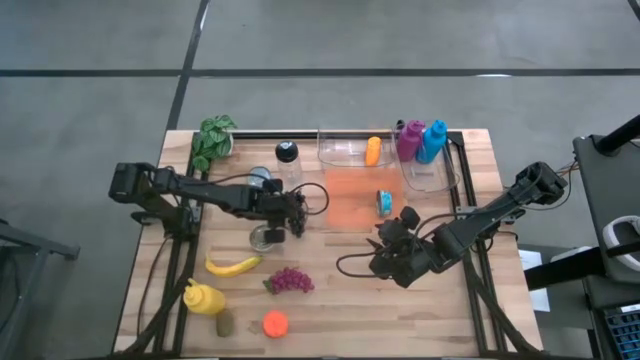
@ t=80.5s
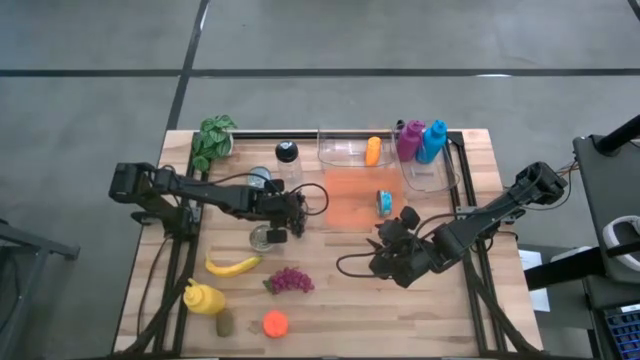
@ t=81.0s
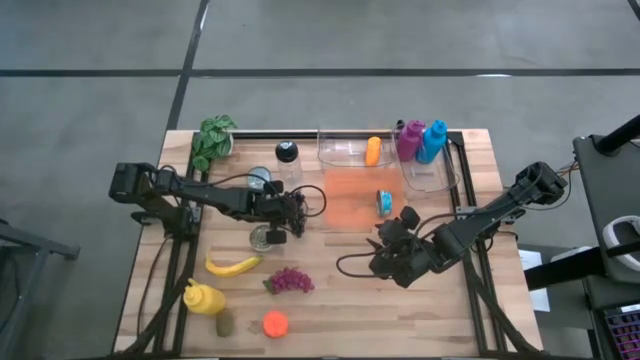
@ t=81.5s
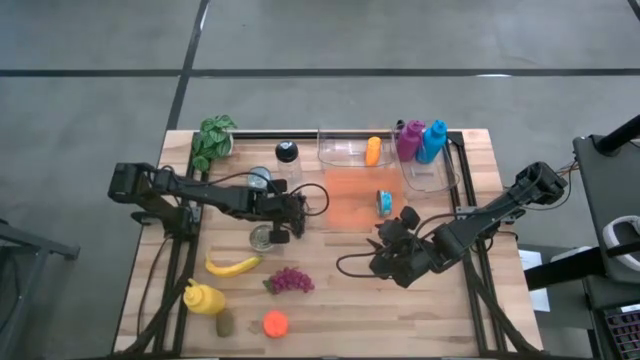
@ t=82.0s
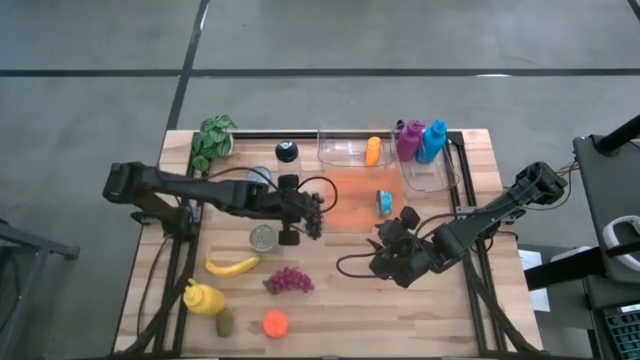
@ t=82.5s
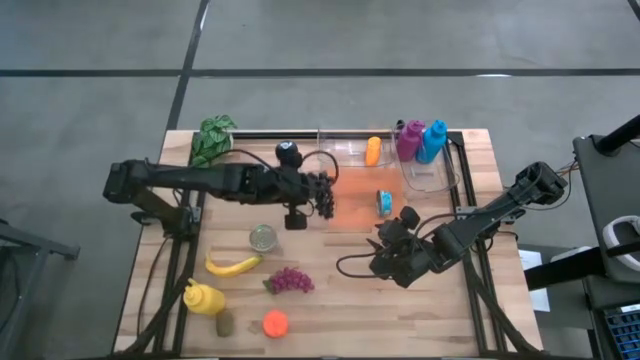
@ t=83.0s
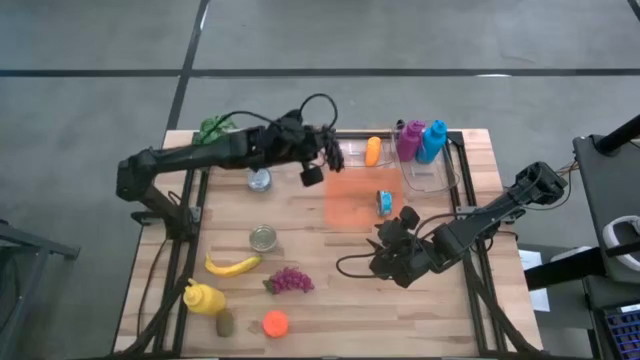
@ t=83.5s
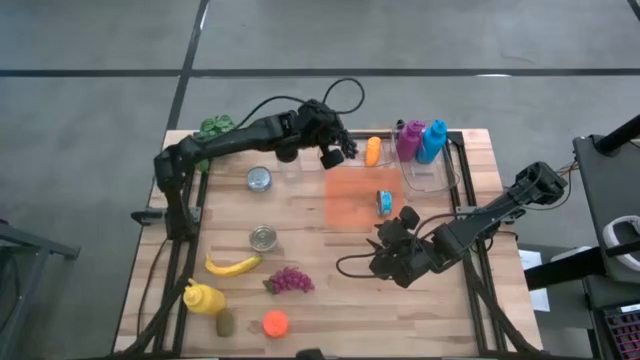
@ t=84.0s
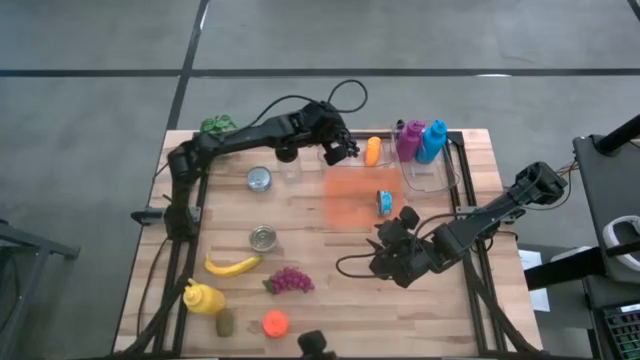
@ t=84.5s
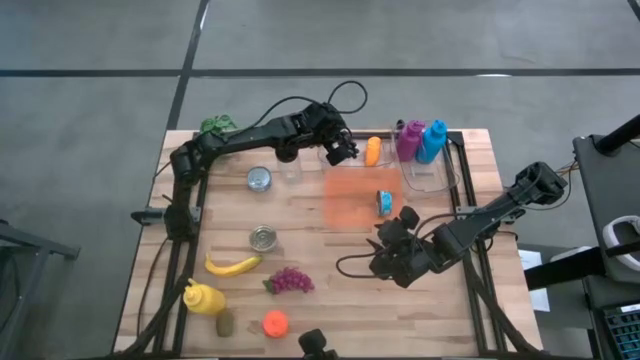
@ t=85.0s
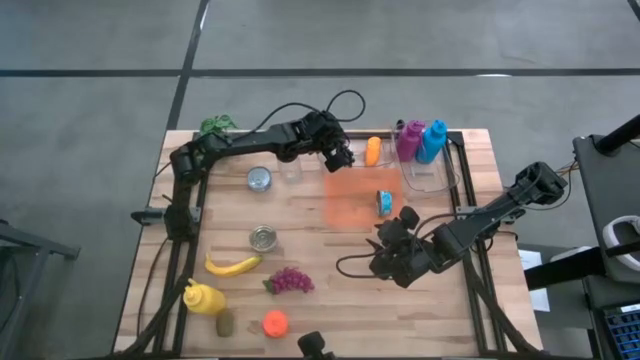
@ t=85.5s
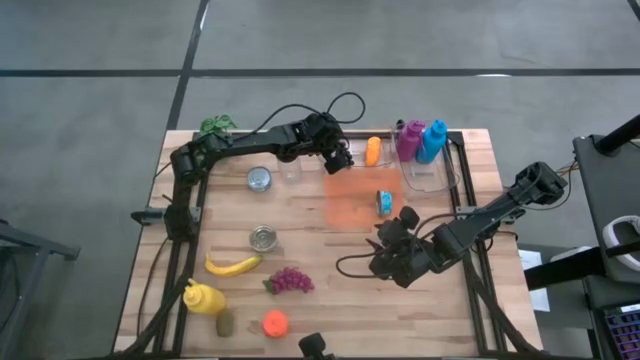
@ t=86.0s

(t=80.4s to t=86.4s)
Task: Pick & Place Food Item
Put the dark violet grapes into the left transparent bin

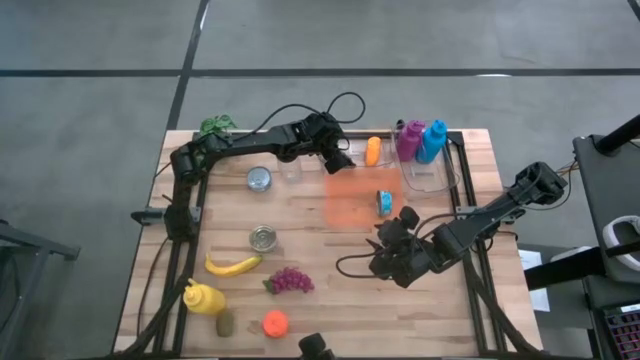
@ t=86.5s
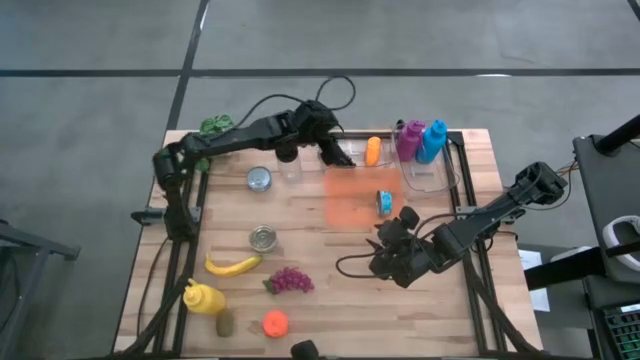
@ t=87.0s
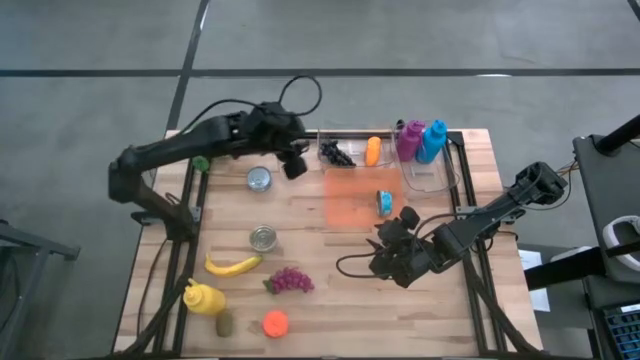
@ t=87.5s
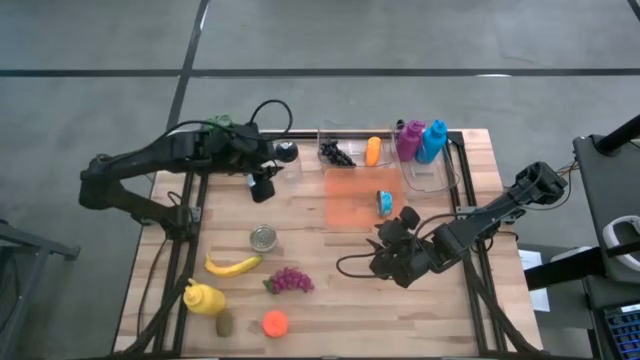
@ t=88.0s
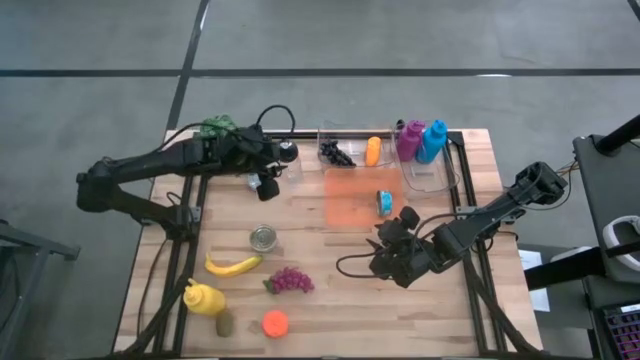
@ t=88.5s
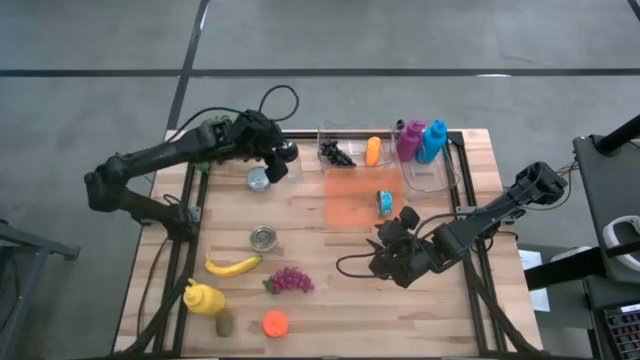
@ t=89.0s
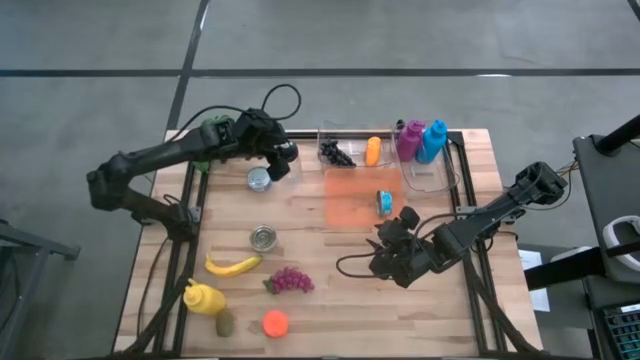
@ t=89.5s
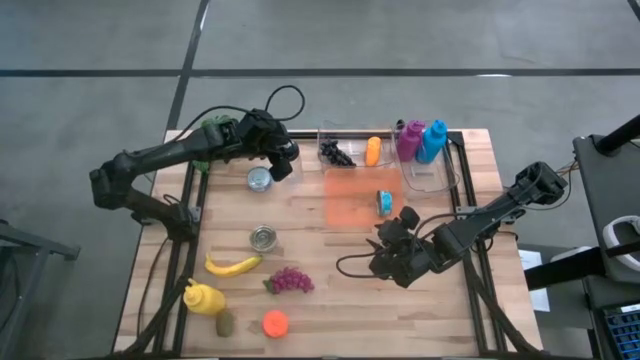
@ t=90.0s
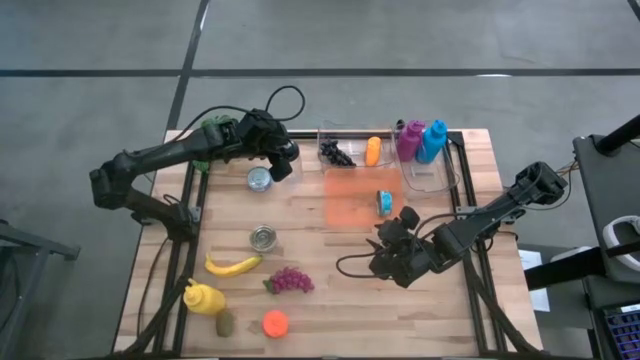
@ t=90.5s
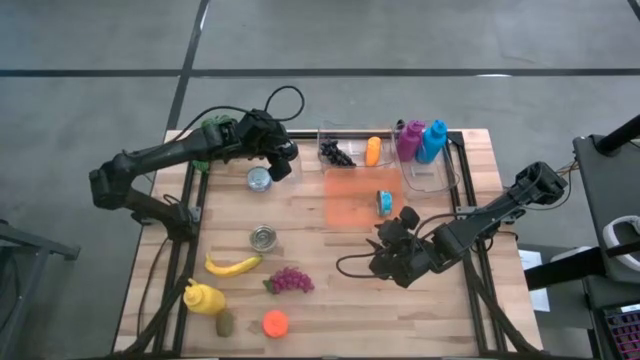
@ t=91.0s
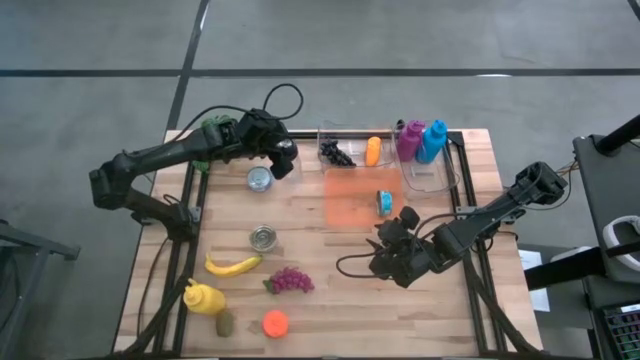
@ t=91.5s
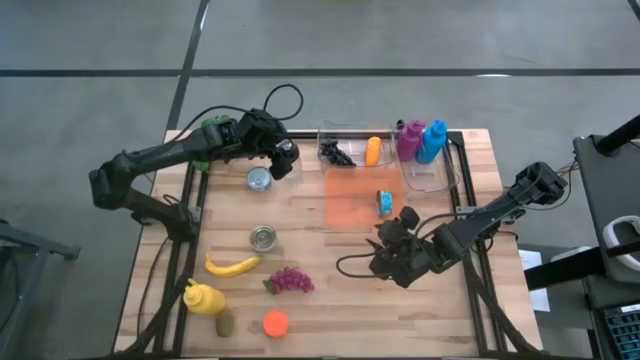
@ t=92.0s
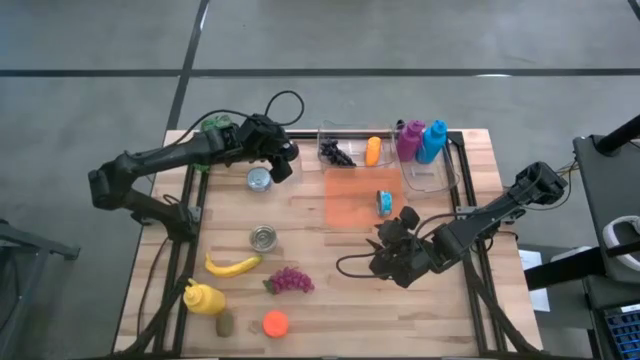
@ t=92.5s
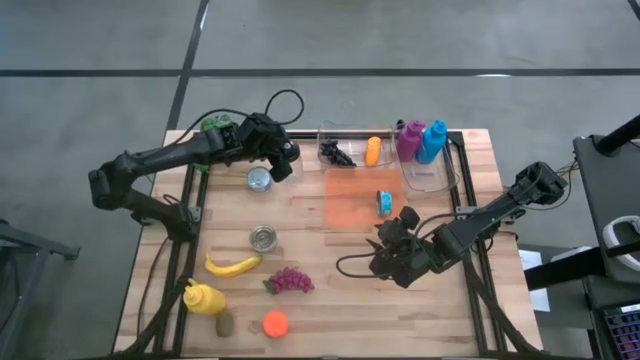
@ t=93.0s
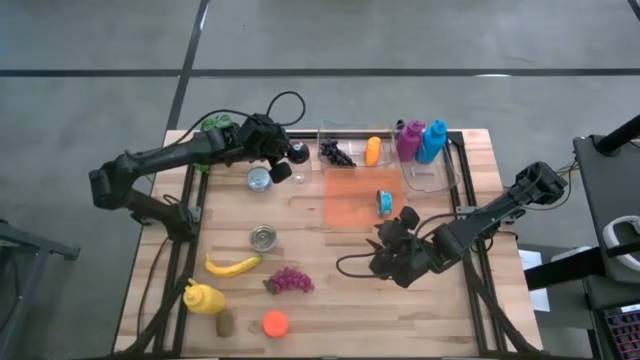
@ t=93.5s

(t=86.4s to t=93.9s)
Put the transparent water bottle into the right transparent bin

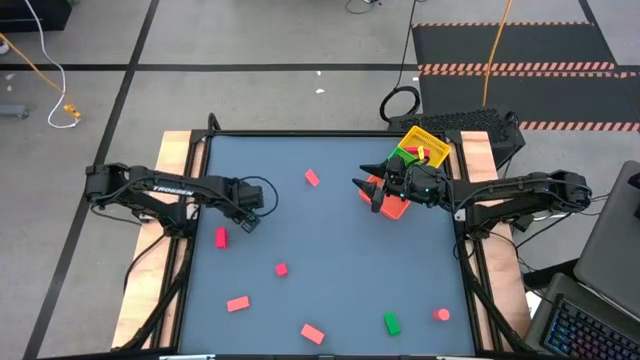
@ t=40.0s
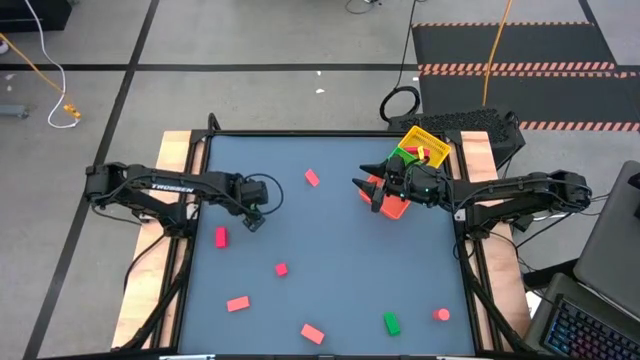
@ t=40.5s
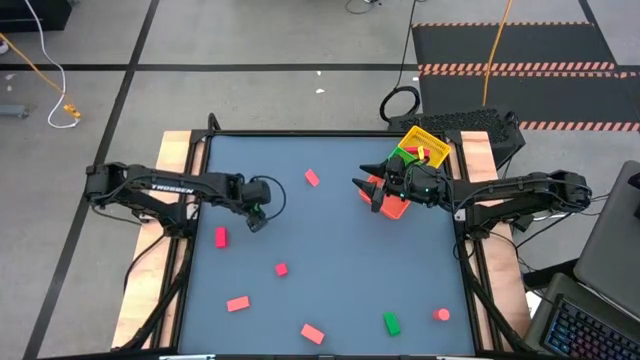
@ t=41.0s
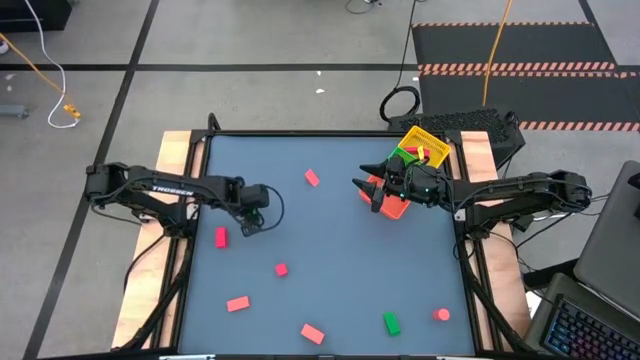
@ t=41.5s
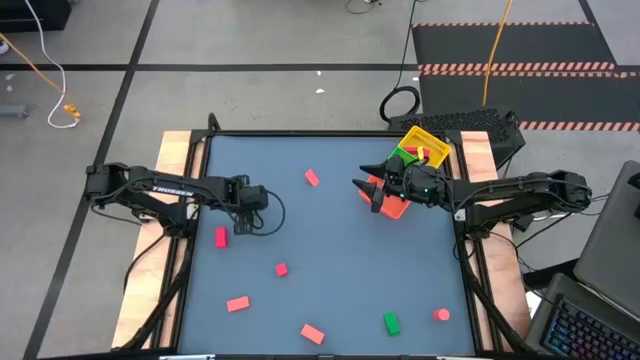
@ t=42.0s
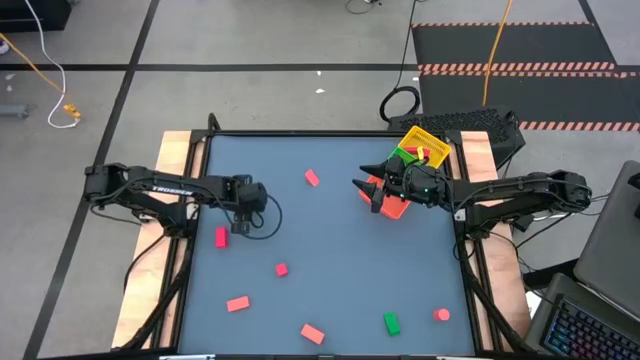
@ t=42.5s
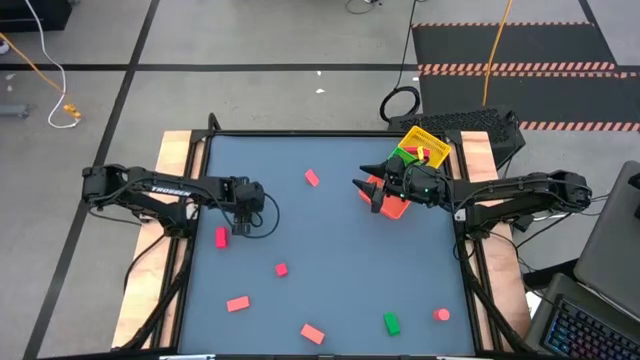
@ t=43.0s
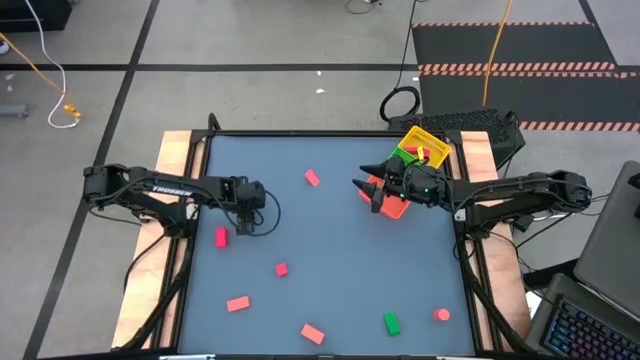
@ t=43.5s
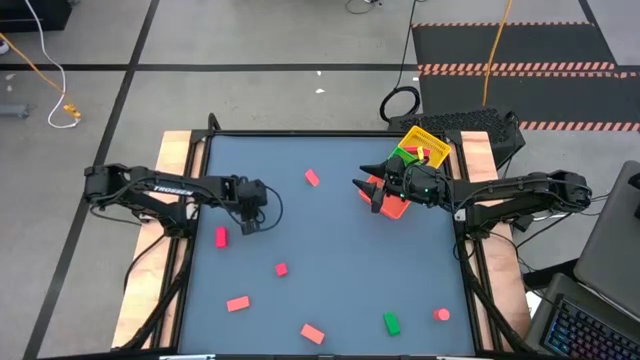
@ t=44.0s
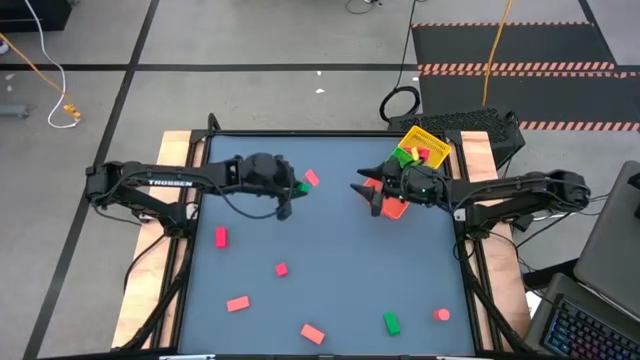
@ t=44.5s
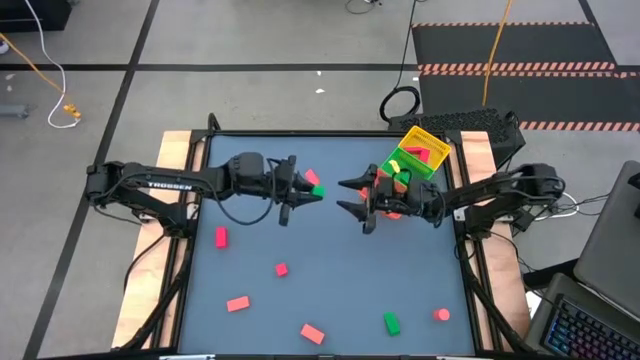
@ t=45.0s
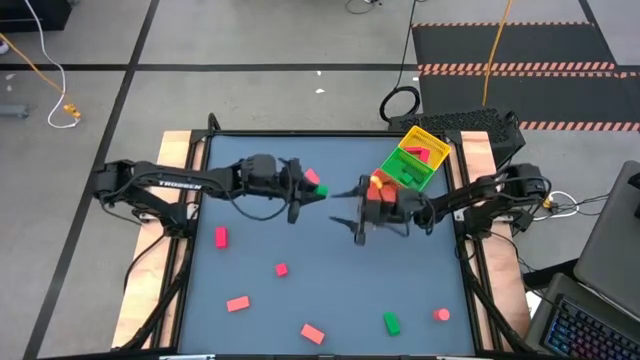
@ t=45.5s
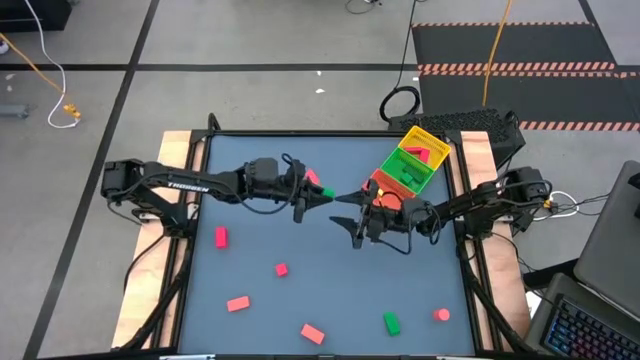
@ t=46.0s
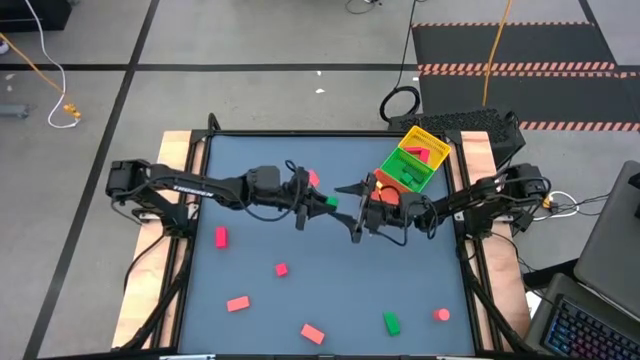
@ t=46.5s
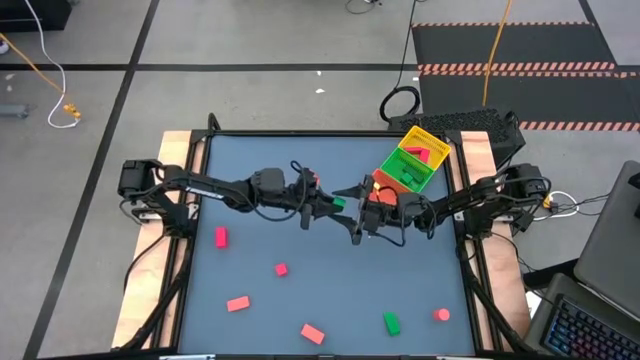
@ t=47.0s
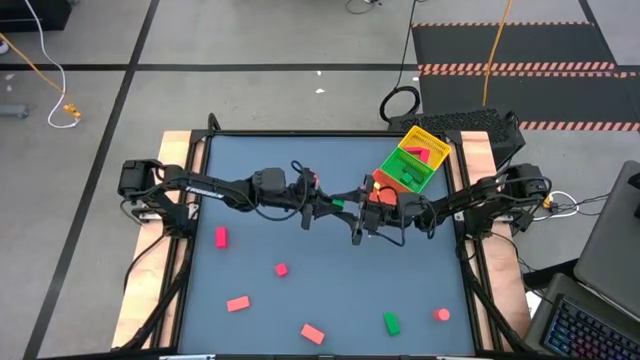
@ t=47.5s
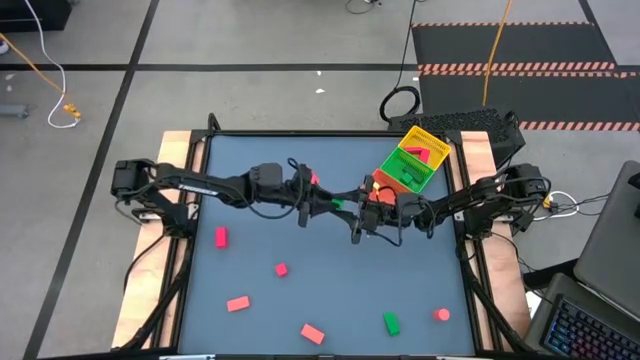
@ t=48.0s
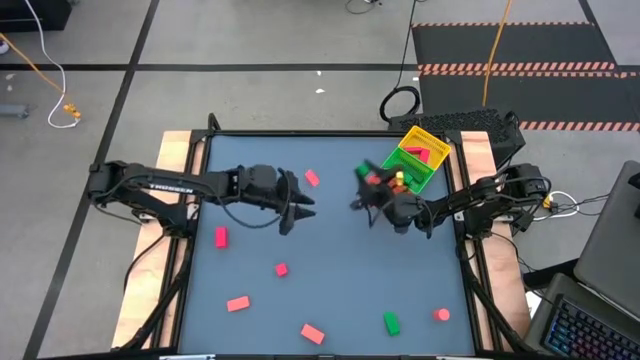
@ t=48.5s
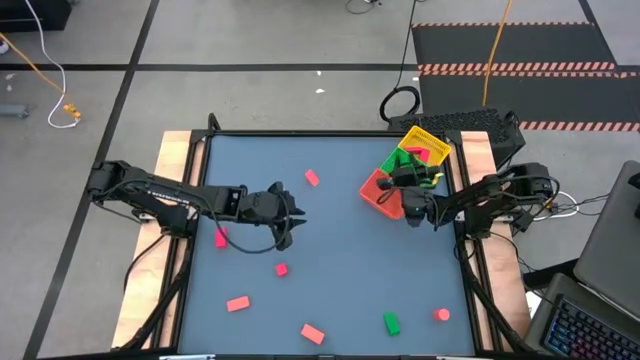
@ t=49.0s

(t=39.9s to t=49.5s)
Task: Sort & place blocks by color
Put the green block into the green bin
